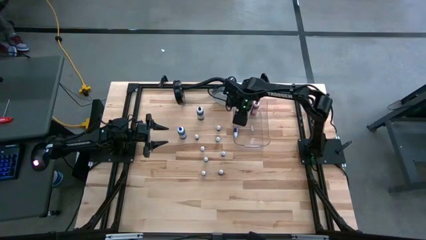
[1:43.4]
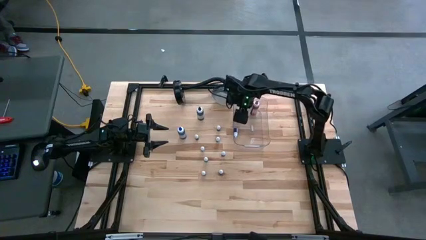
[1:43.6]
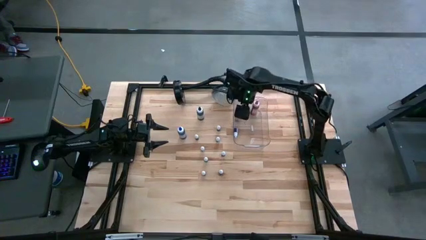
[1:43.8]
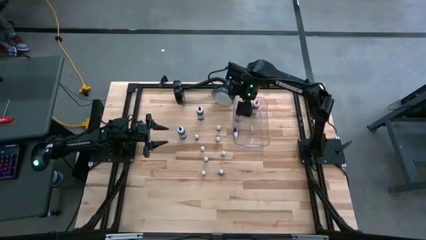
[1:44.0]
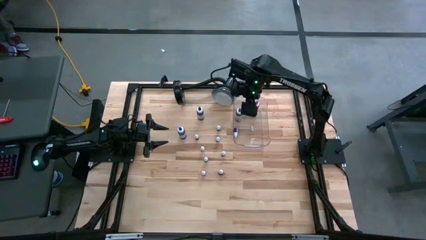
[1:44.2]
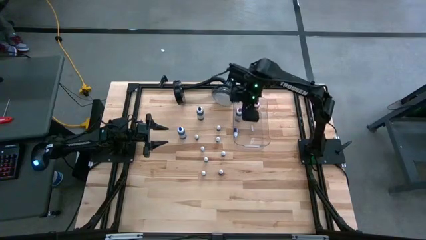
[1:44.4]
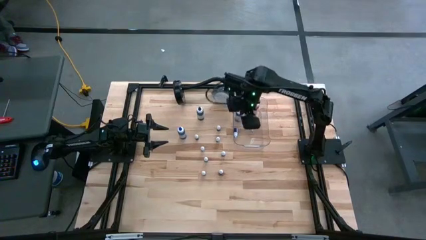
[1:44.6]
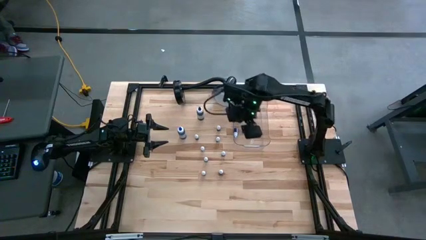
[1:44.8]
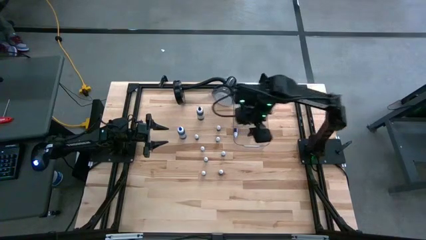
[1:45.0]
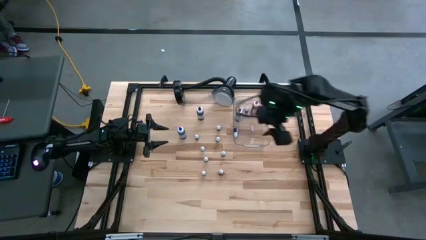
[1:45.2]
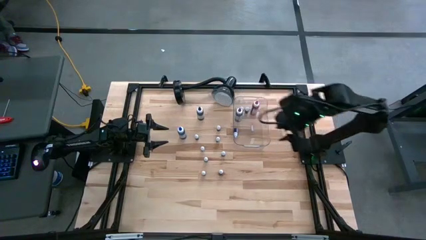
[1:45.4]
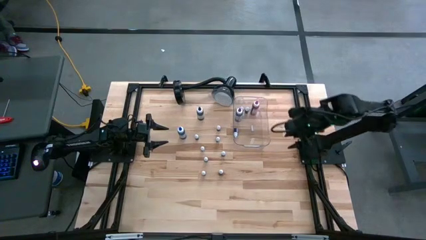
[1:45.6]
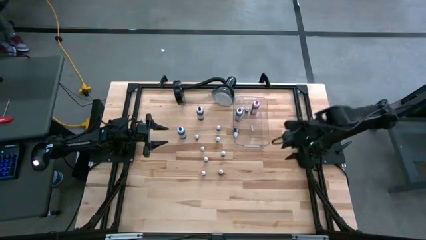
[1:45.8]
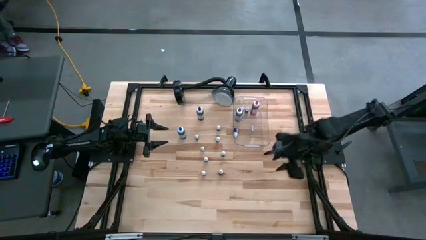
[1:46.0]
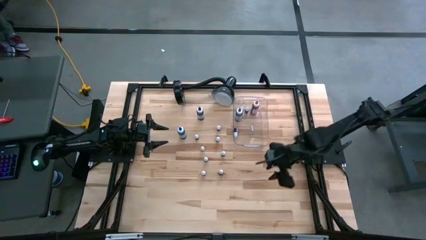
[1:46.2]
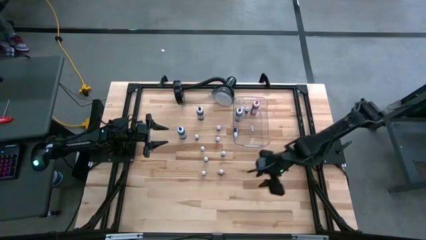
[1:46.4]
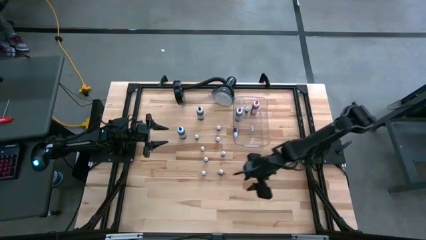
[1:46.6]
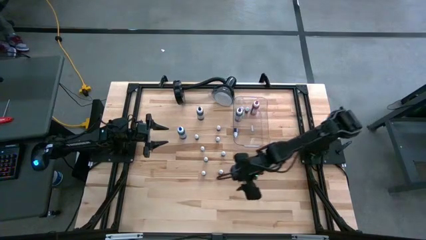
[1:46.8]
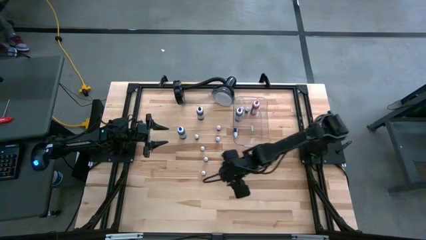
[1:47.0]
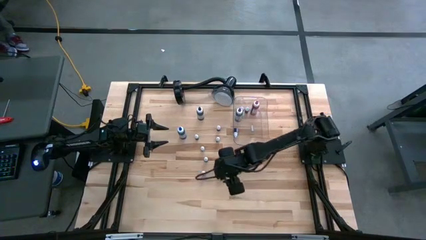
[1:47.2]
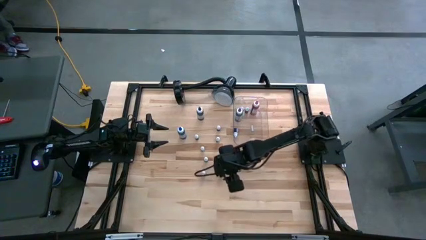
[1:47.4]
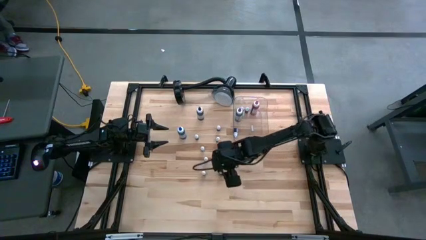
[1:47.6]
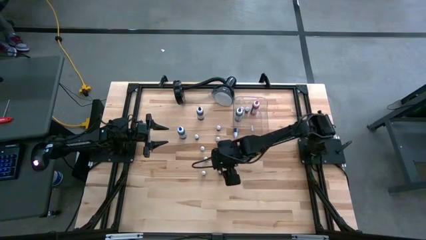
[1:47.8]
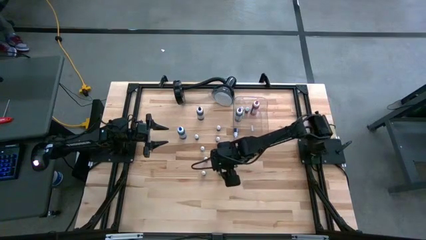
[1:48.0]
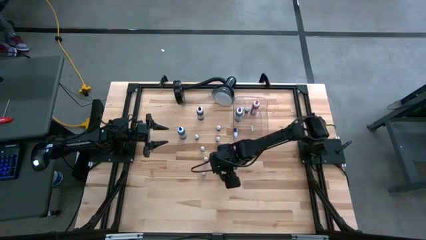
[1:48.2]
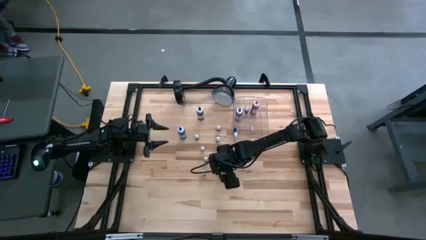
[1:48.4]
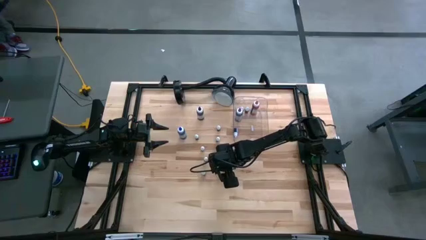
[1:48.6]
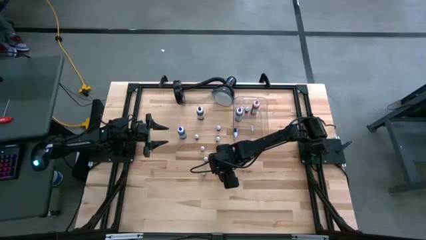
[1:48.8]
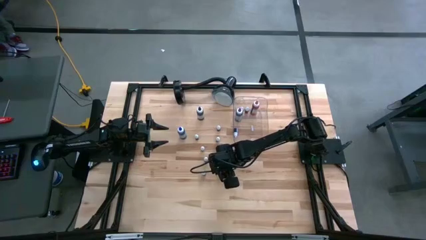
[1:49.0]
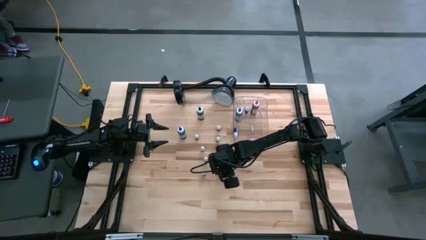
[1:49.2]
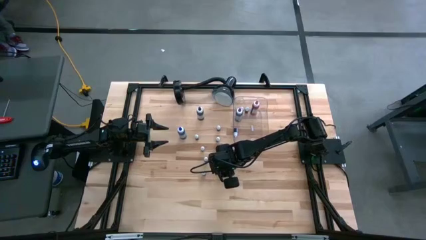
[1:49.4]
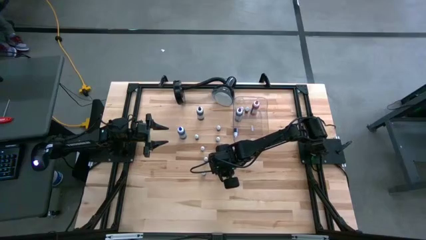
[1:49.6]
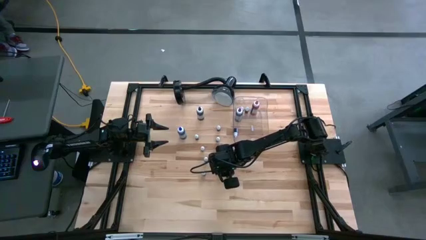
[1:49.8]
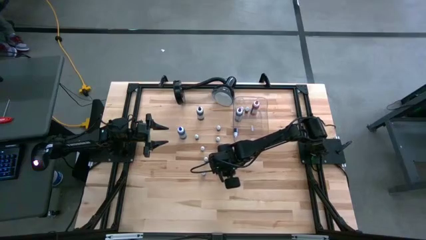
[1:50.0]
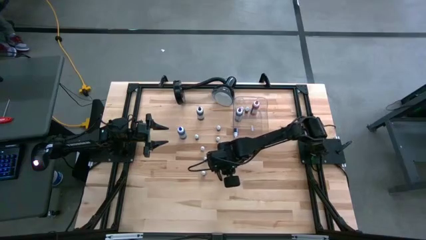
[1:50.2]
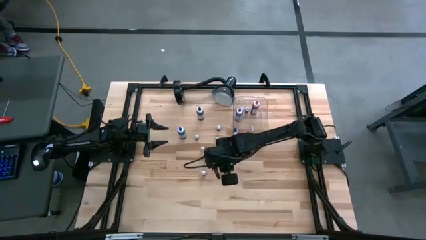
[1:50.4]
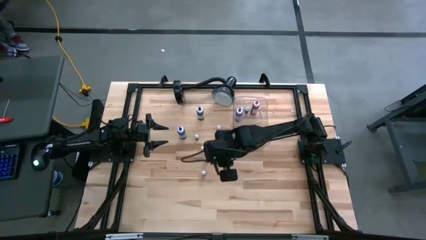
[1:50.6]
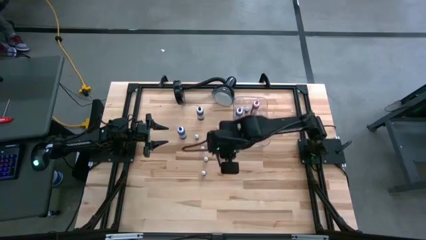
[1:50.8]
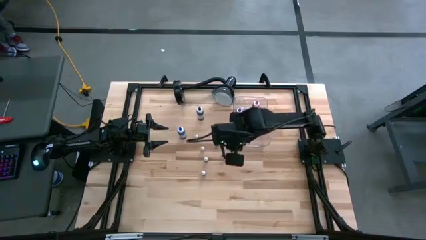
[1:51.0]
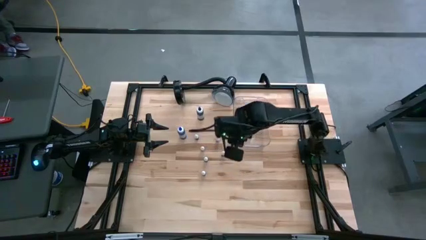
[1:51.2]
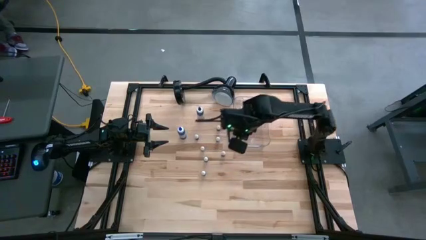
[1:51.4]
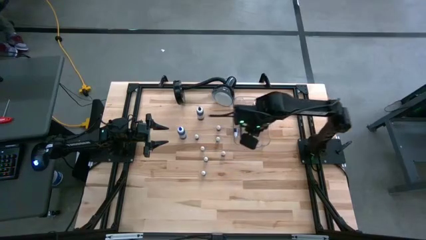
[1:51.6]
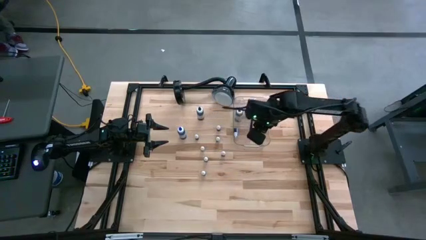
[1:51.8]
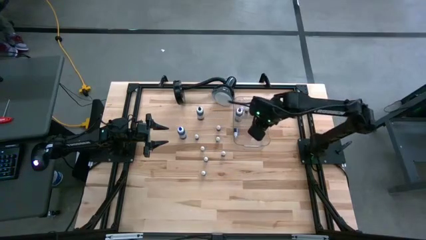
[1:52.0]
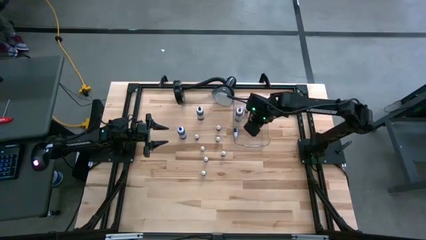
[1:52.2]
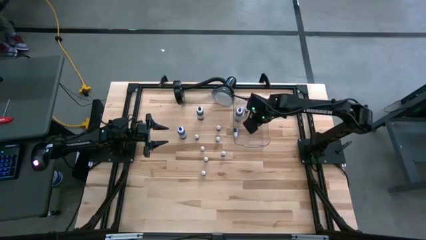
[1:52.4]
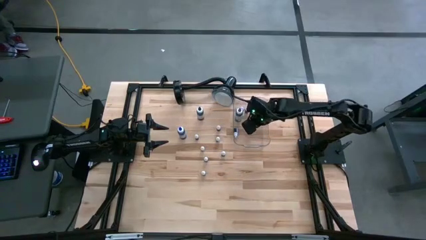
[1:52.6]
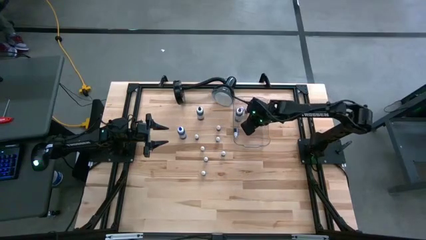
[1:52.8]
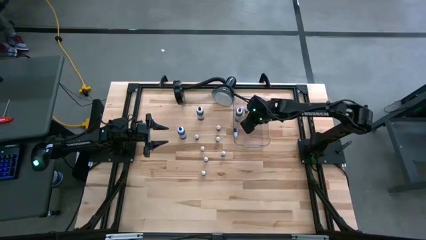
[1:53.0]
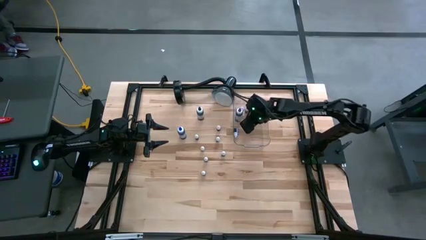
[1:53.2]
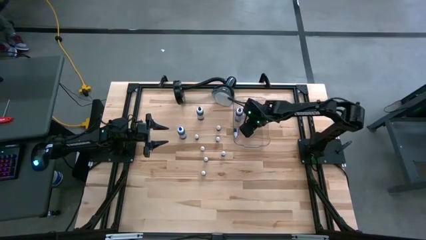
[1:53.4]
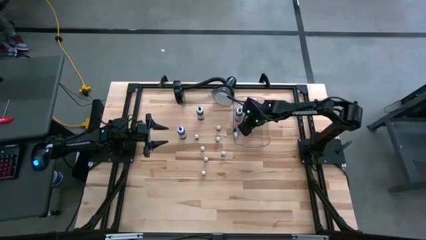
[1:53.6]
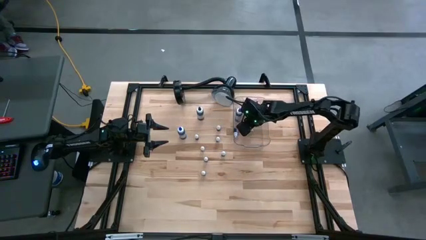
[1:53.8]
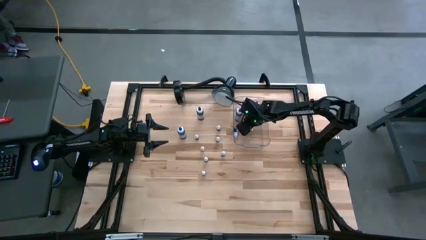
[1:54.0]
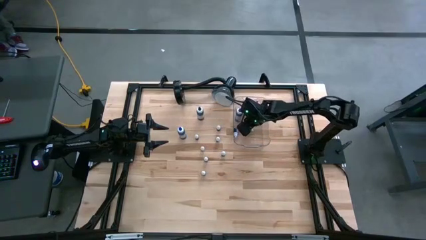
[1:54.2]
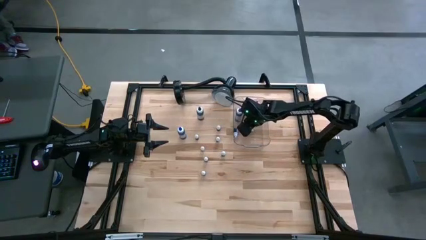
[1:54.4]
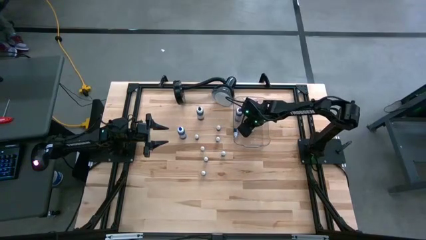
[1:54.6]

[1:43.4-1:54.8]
Task: Pick & Place food coloring
Put the small black food coloring bottle into the transparent bin

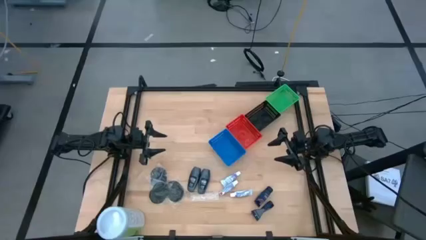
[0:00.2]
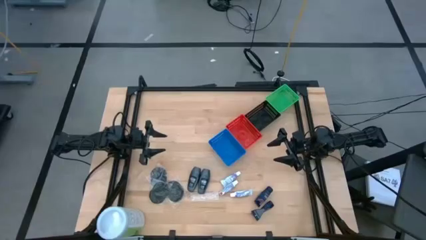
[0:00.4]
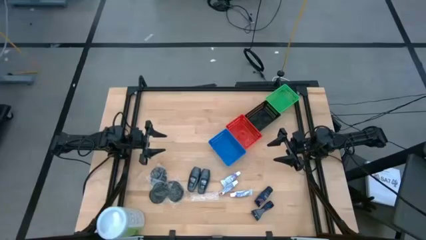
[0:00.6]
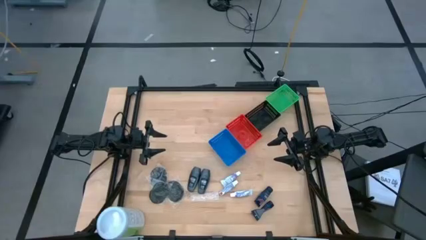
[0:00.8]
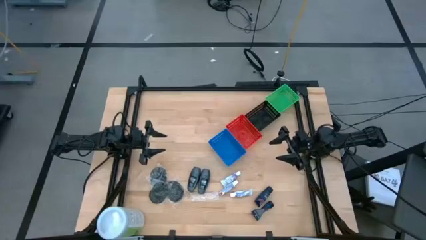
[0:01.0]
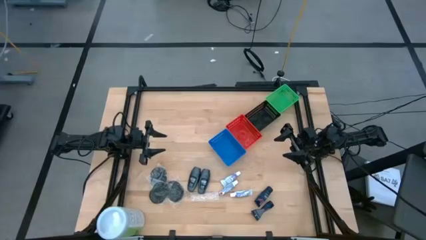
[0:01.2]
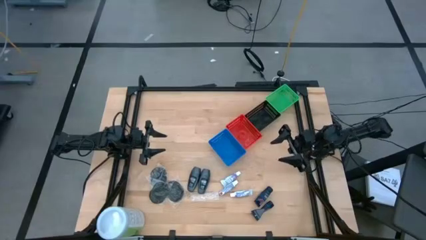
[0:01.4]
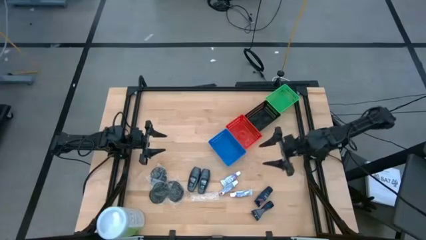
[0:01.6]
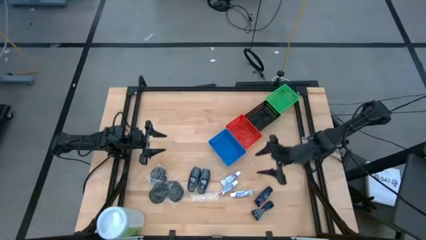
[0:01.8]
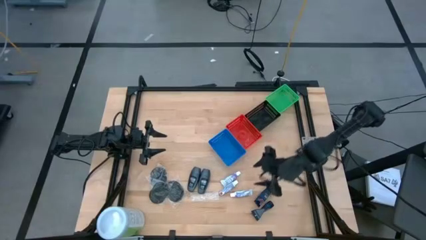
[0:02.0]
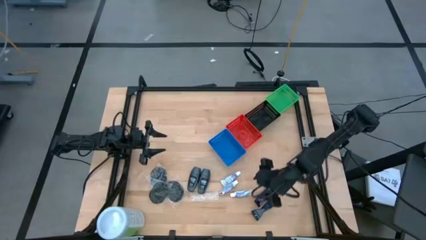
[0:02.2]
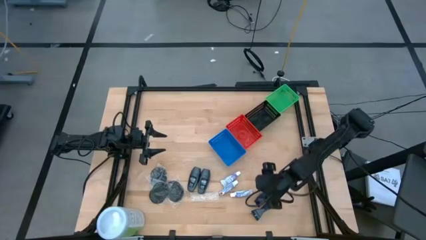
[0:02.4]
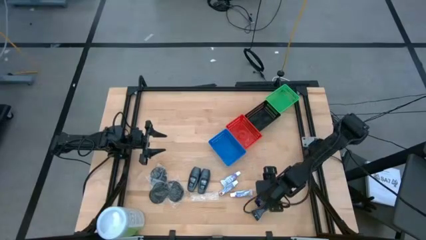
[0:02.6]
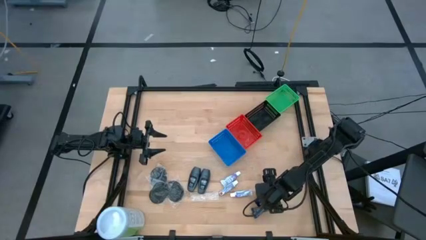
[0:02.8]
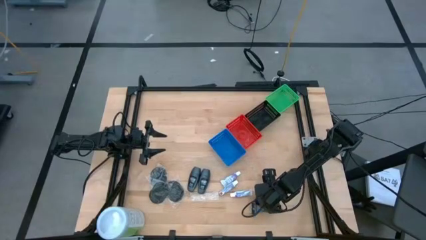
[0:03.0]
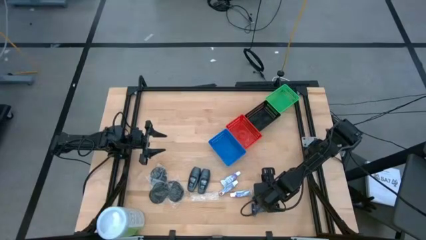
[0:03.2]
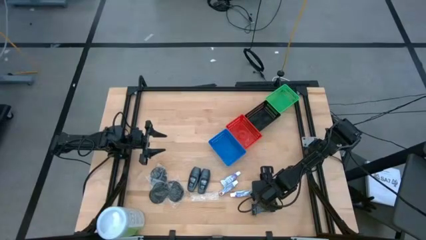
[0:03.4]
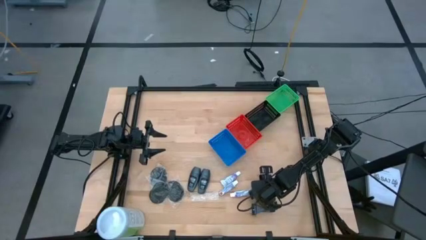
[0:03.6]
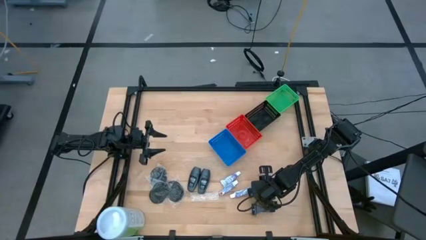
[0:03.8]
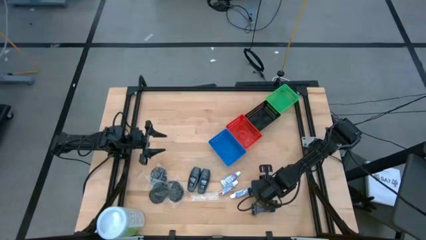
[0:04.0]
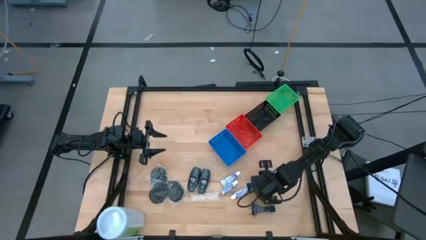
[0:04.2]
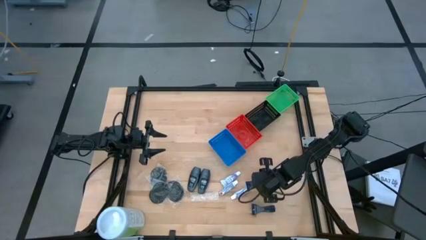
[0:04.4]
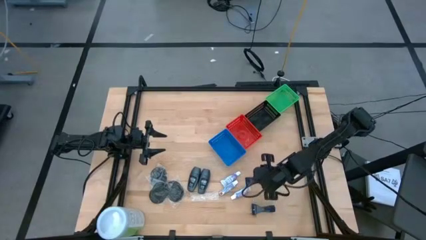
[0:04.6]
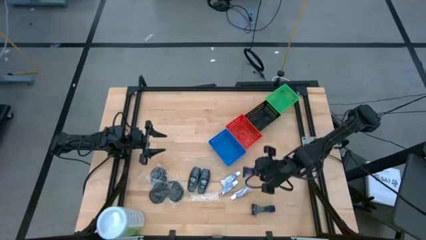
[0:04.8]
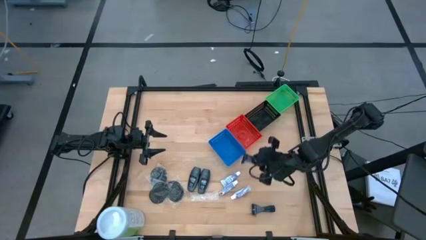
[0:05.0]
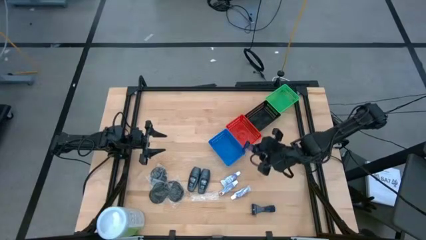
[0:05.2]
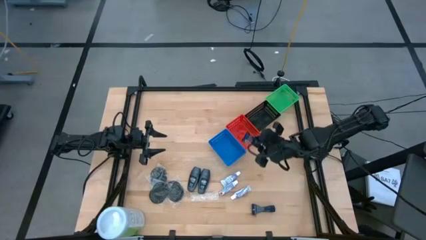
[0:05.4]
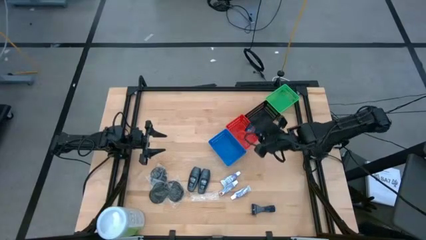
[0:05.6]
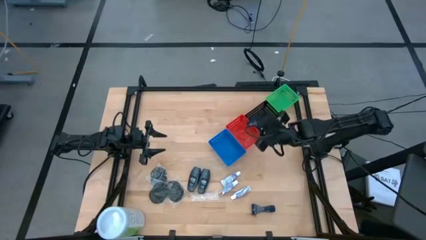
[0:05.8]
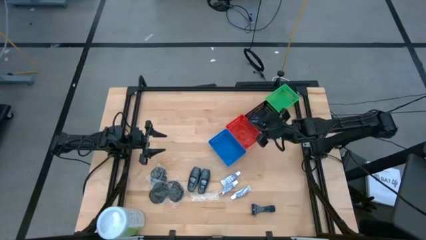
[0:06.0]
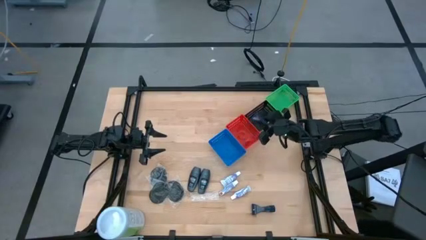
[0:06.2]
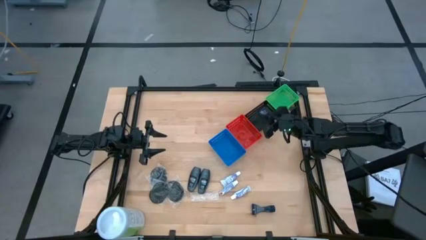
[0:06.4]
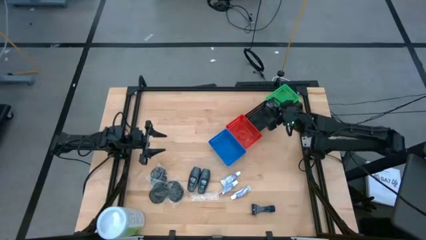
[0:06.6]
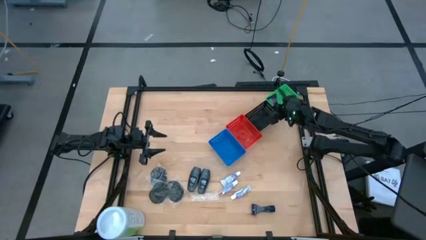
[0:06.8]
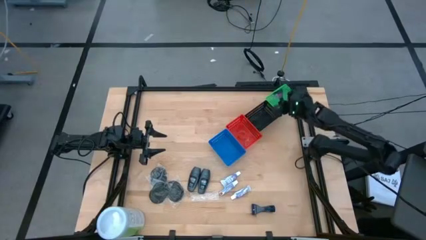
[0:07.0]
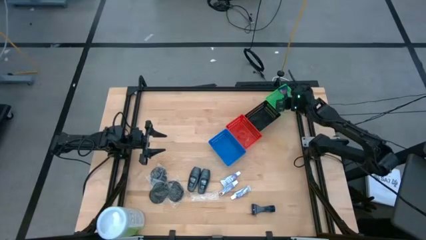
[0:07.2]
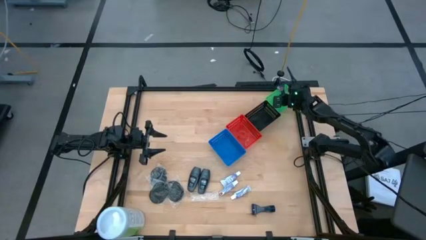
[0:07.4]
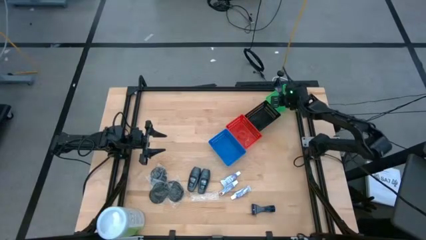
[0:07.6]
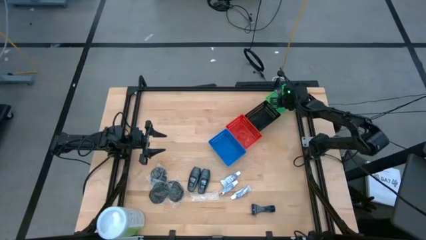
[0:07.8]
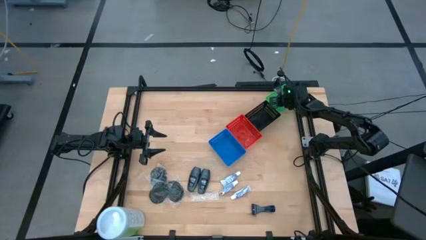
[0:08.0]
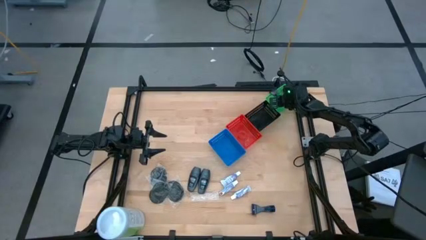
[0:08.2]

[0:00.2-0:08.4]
Task: Pick & Place Travel size toiletries
Put the top shave cream into the green bin
